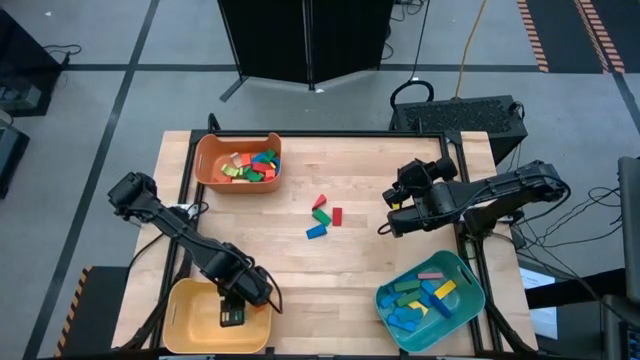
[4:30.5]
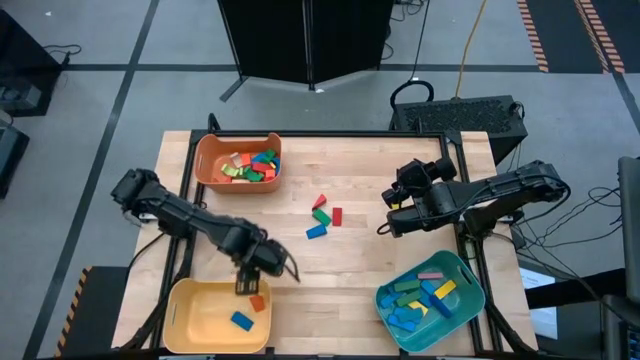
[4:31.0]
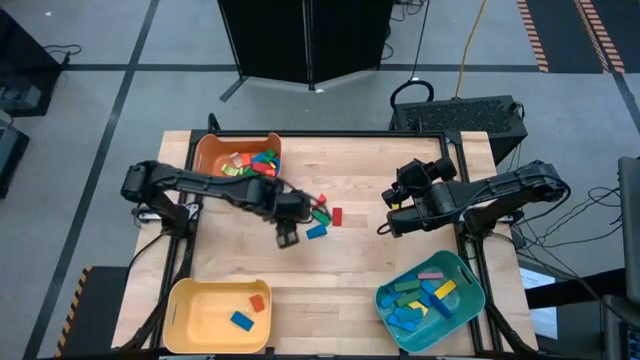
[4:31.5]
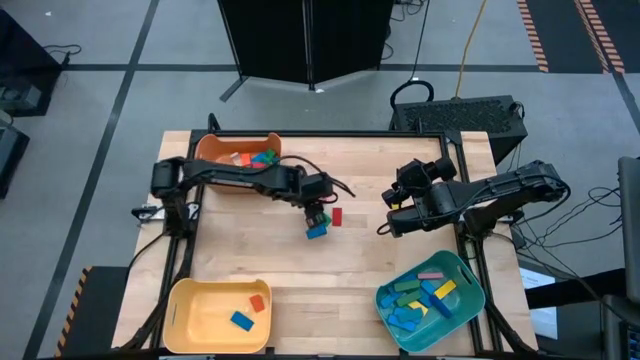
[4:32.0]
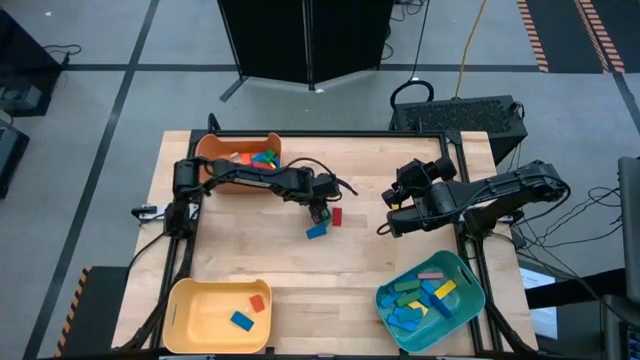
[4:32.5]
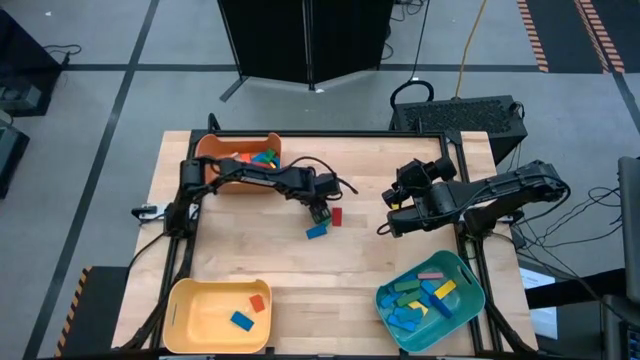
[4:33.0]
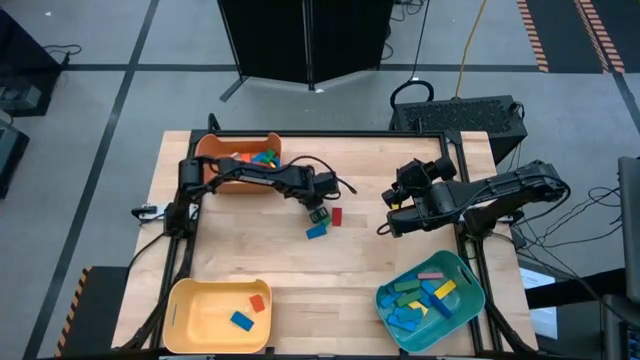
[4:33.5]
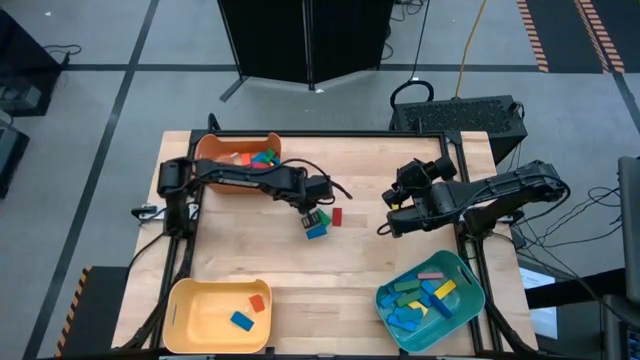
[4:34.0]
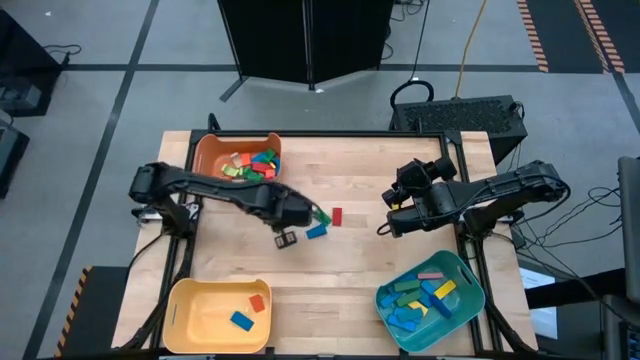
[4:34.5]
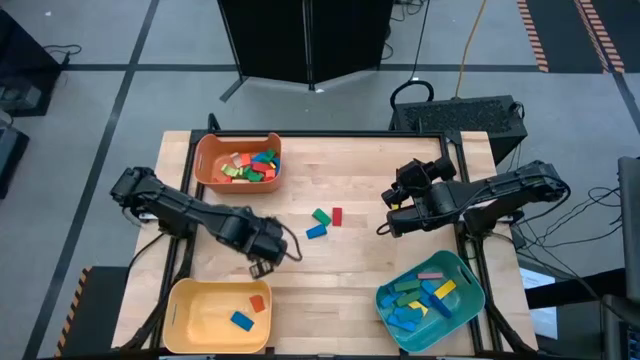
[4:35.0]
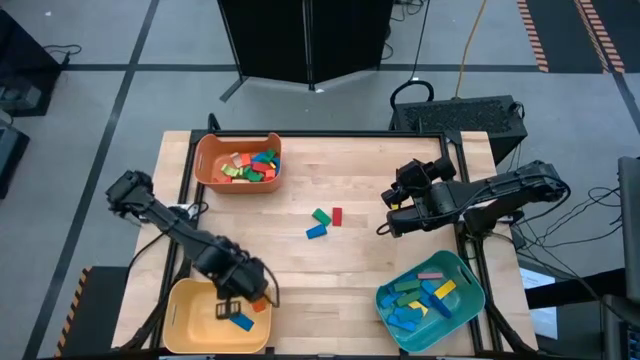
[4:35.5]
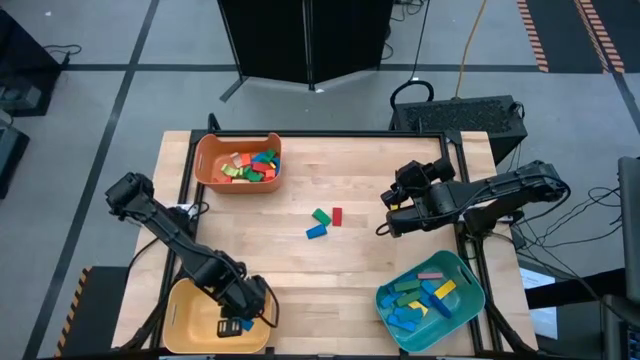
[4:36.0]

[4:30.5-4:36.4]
Task: Sort blocks by size
Put the red triangular block into the yellow bin

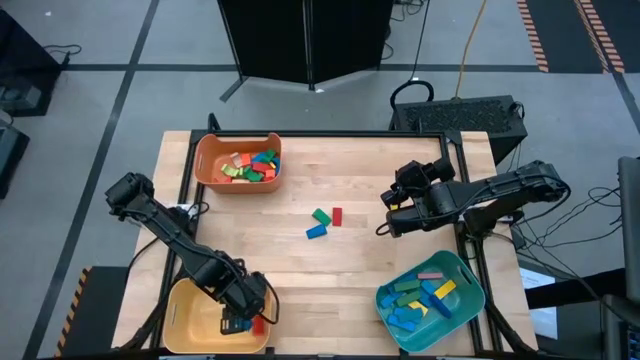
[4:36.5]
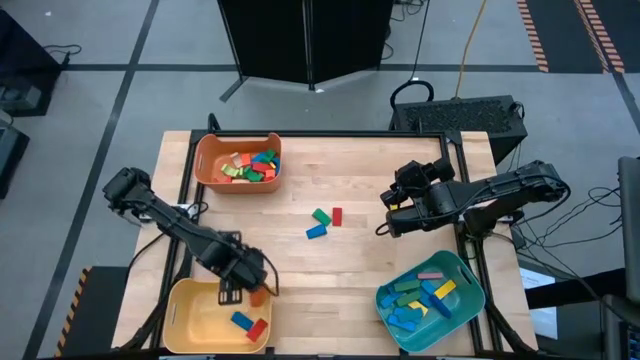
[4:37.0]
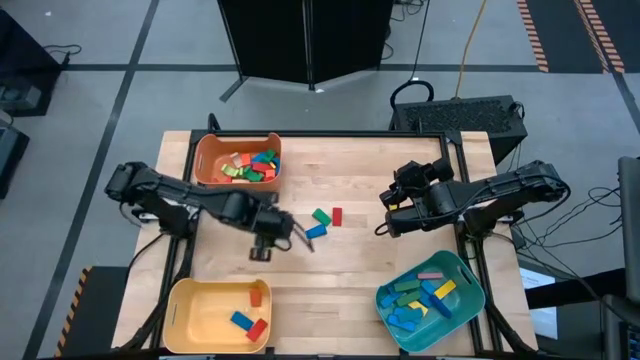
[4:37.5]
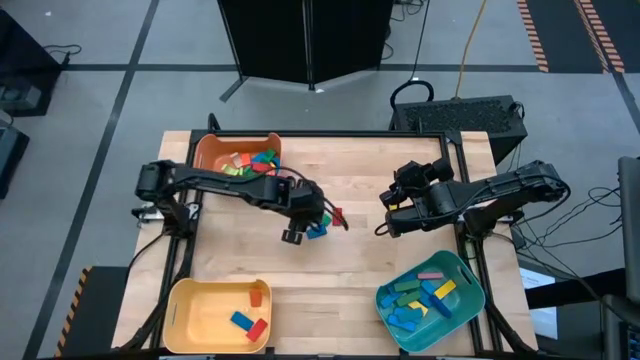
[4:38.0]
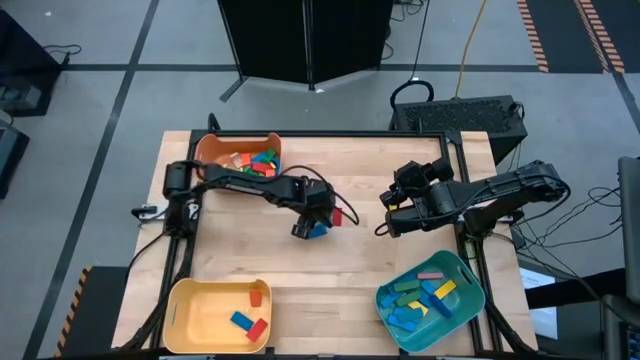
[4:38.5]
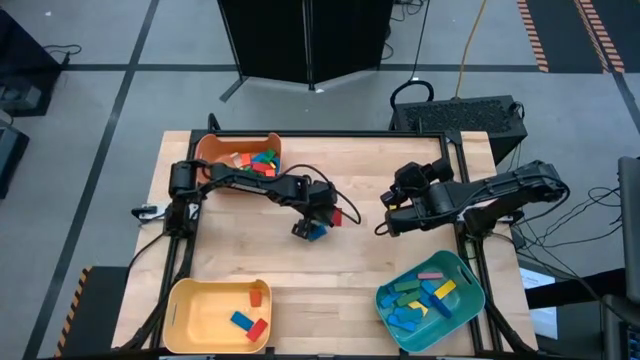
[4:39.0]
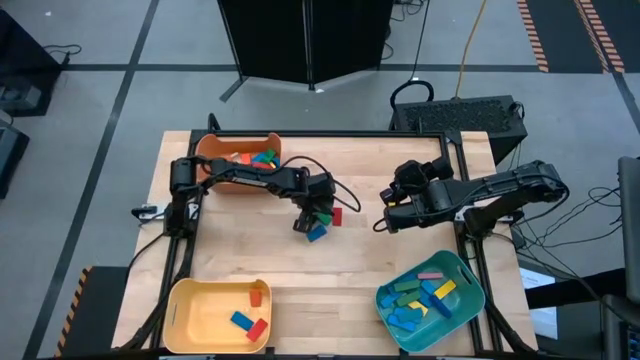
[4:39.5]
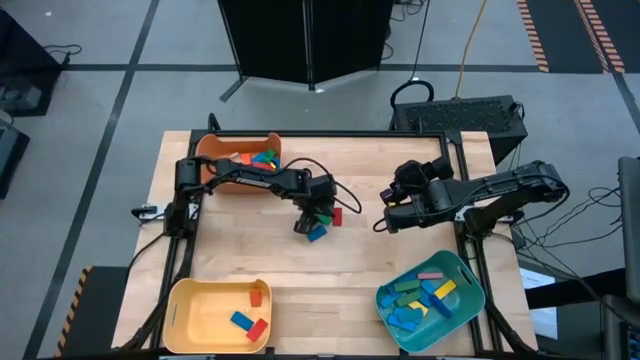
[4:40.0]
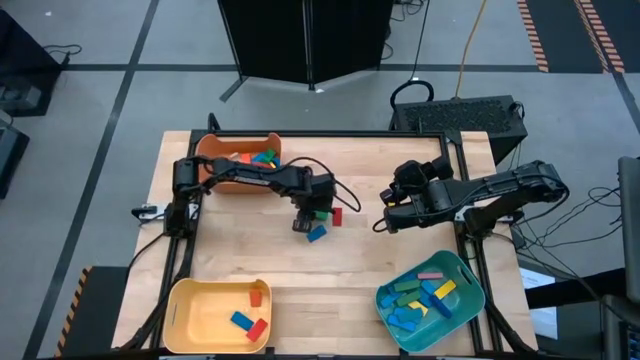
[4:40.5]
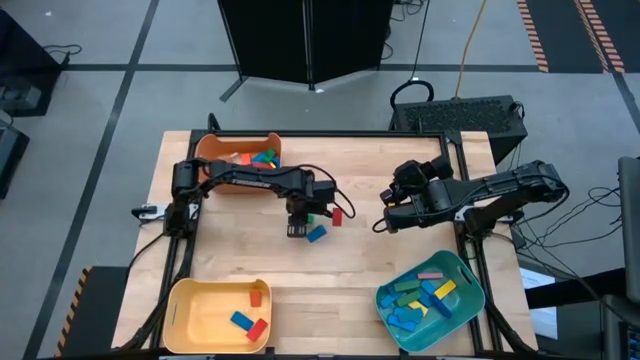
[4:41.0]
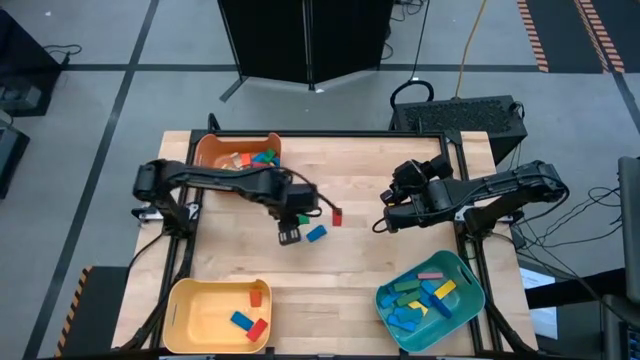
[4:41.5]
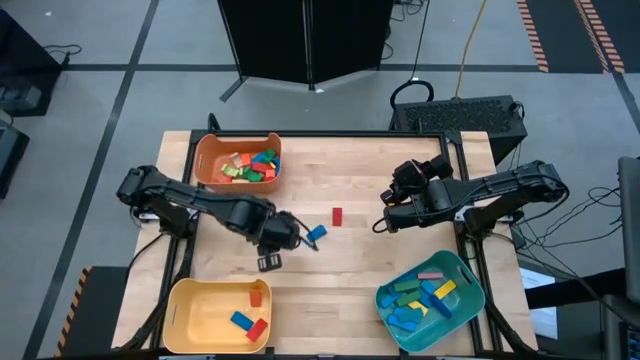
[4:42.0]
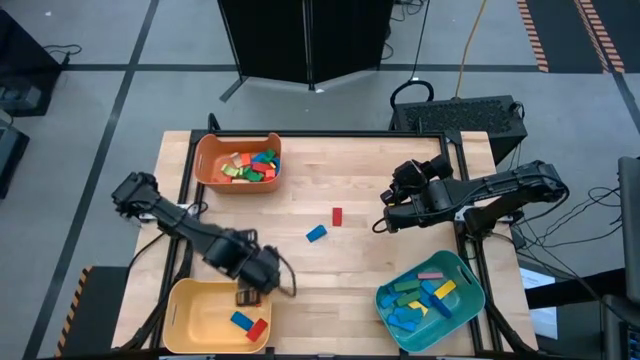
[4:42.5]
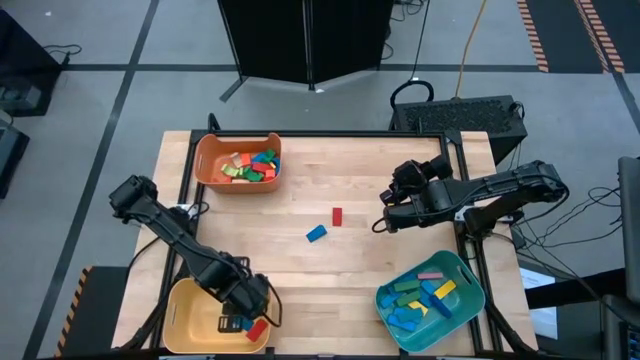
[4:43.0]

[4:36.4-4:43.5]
Put the green triangular block into the yellow bin

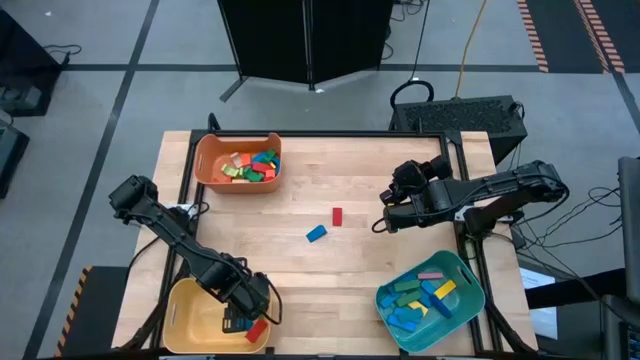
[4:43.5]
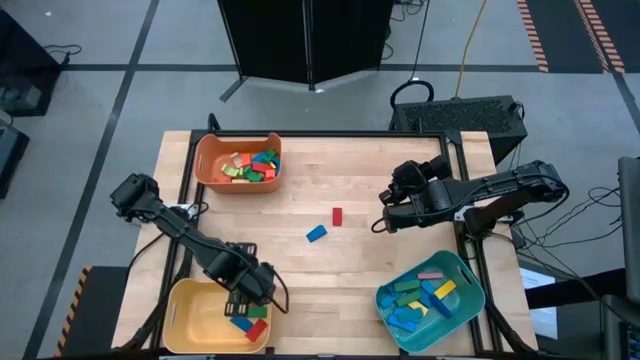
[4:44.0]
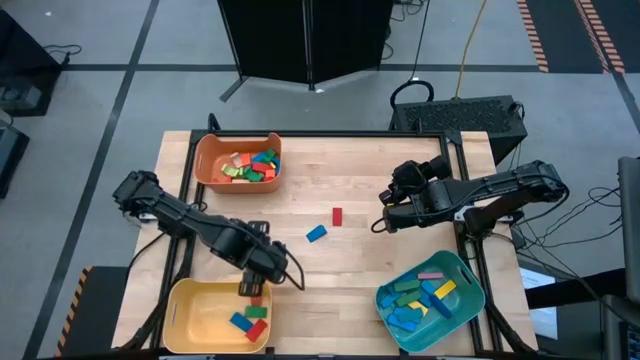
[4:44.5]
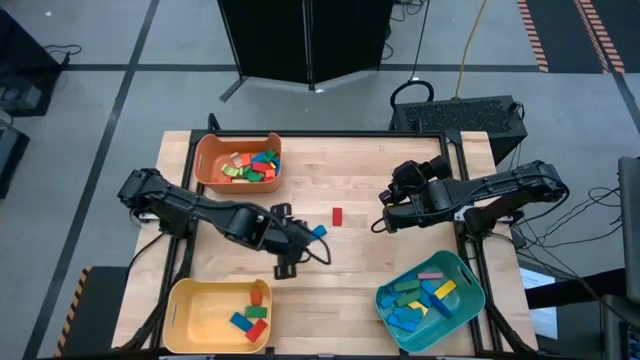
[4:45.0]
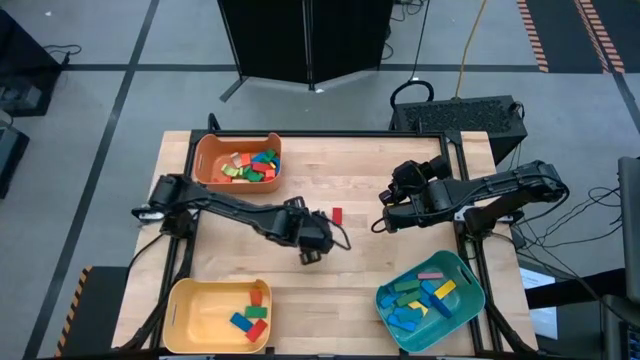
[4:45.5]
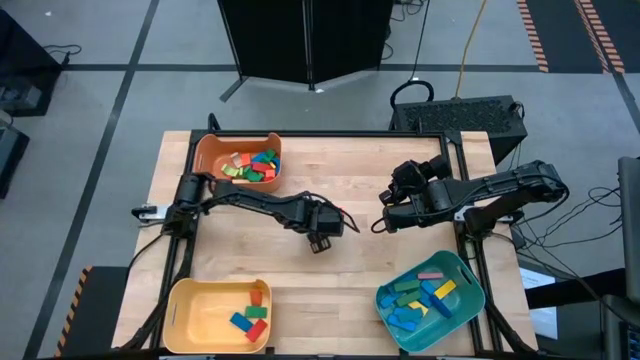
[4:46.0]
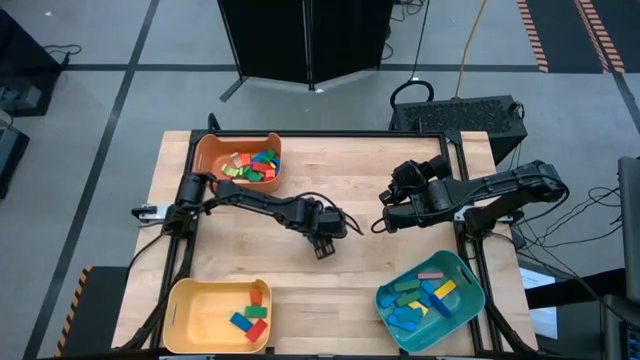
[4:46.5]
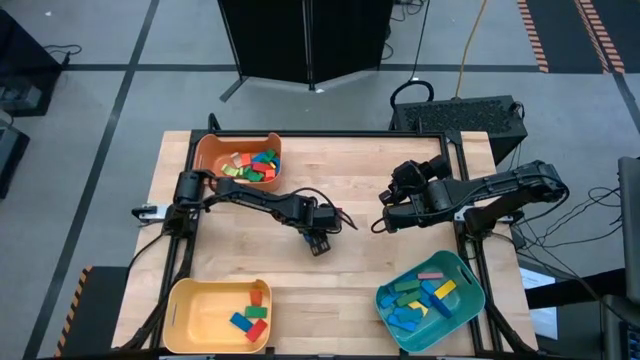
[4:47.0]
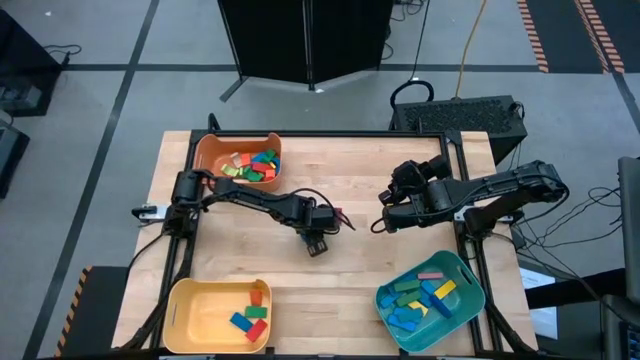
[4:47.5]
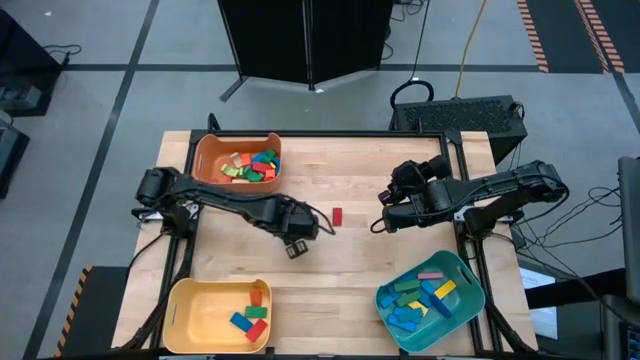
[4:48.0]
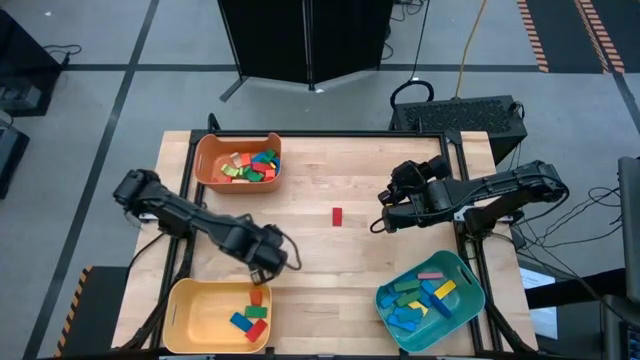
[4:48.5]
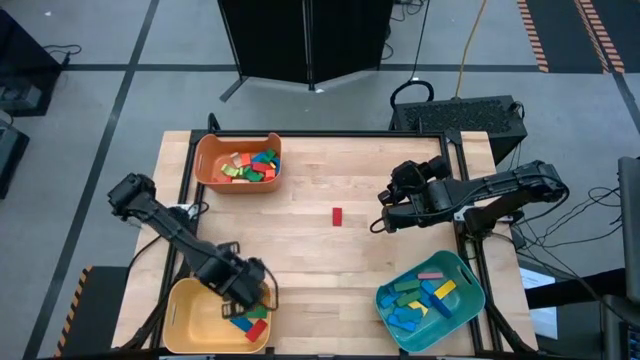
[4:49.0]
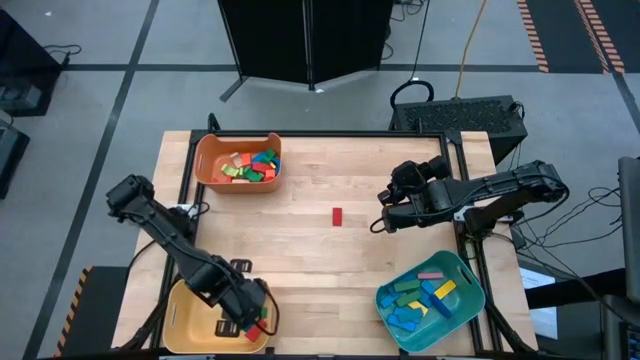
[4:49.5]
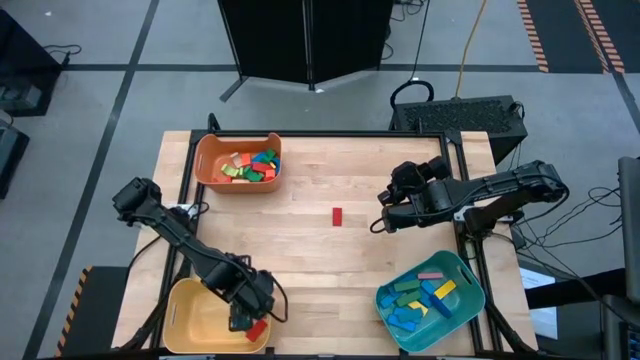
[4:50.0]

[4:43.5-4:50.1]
Put the blue triangular block into the yellow bin

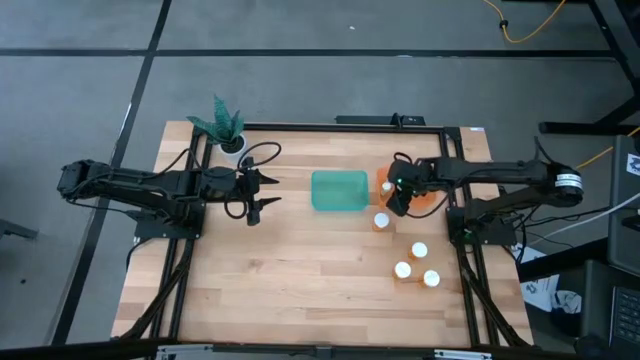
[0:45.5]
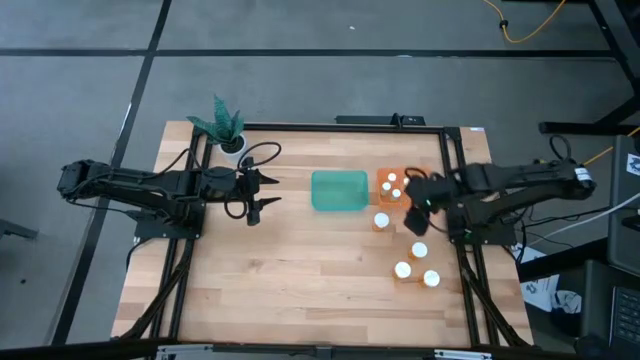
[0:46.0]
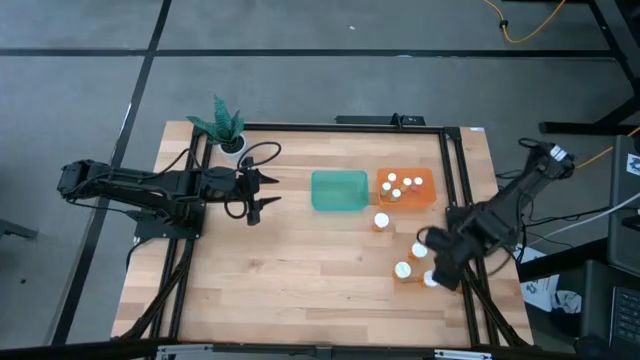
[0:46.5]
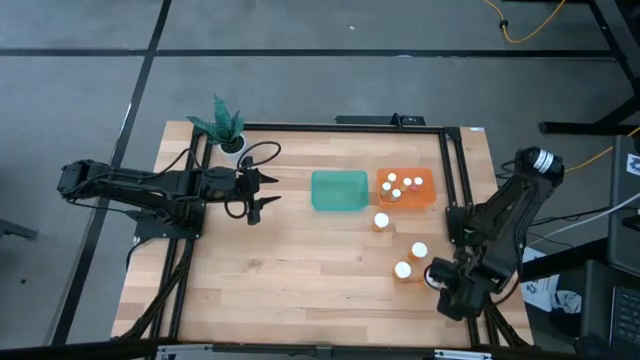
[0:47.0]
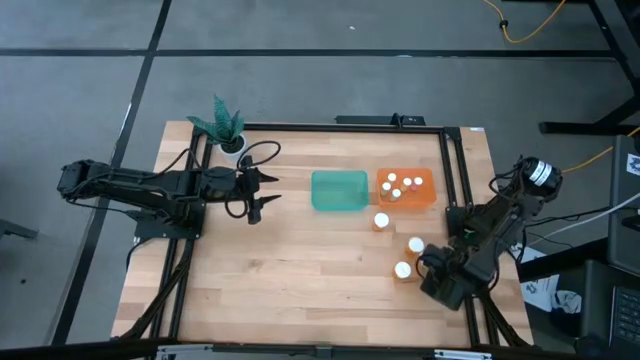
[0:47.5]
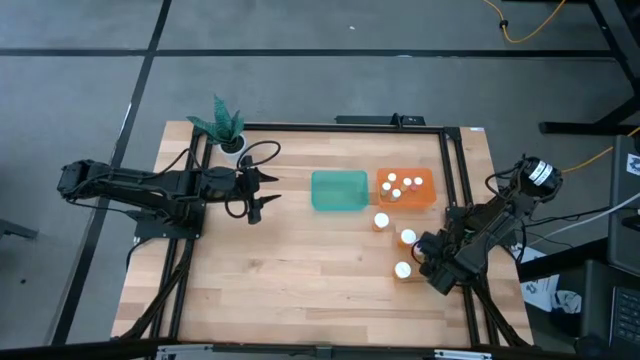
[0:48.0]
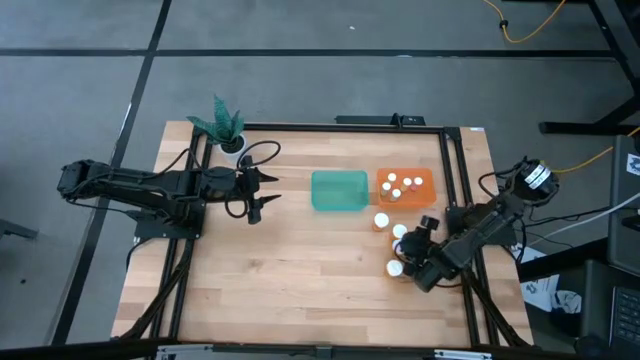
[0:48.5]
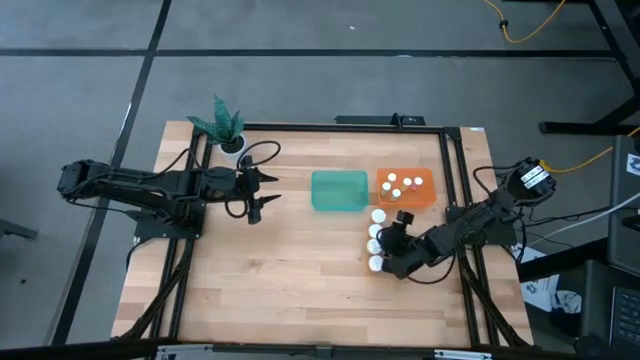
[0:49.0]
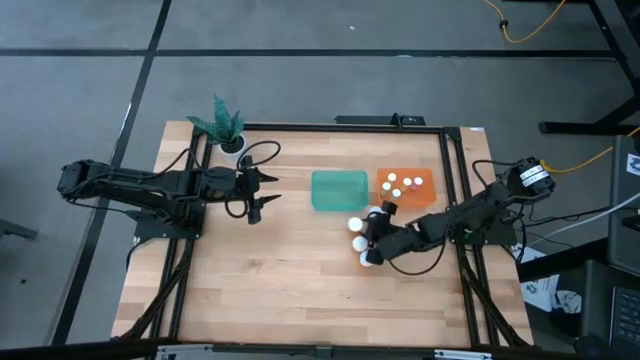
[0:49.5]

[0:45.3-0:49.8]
Task: Pick and place medicine bottles into bin by pill shape (circle, oval)
Prepare the orange pill bottles
